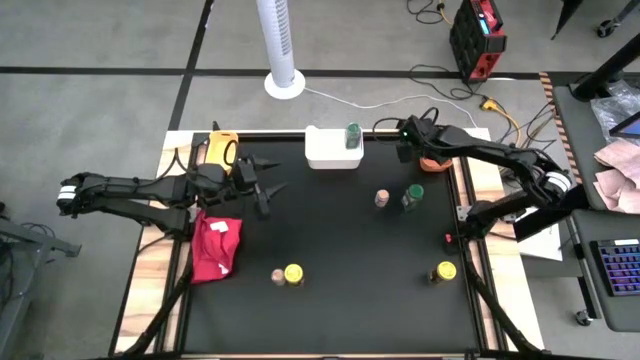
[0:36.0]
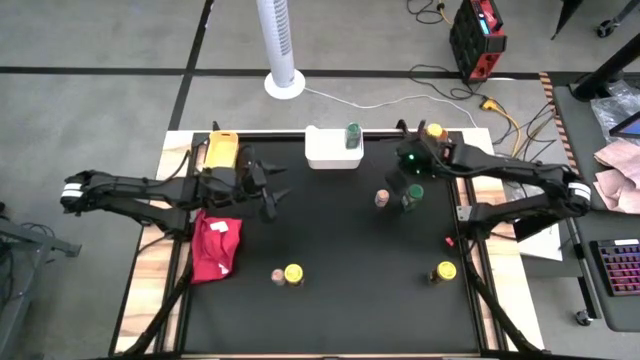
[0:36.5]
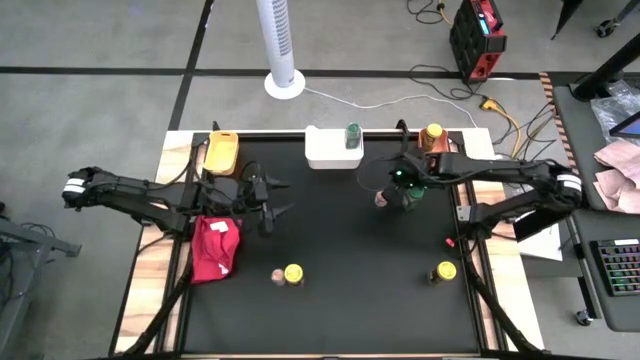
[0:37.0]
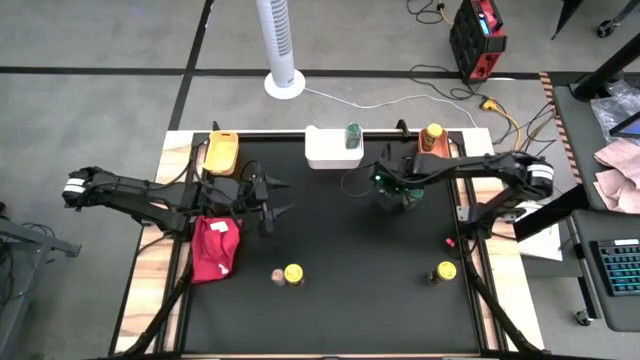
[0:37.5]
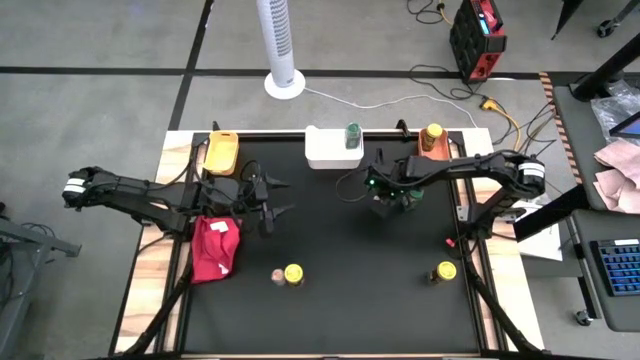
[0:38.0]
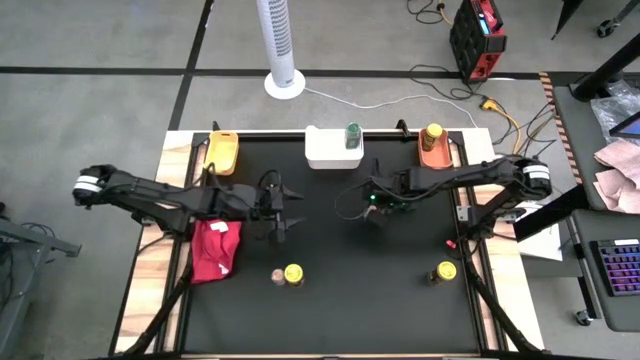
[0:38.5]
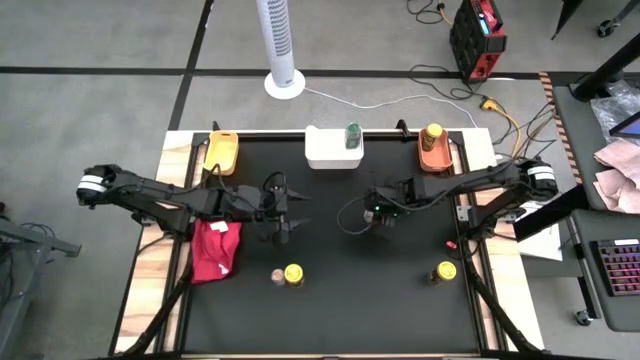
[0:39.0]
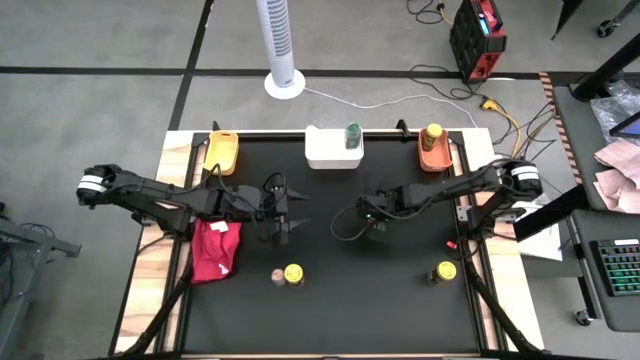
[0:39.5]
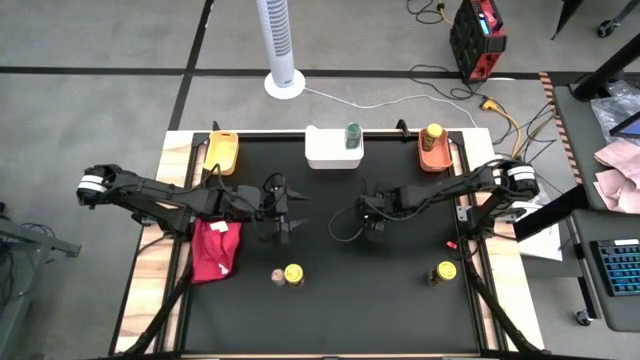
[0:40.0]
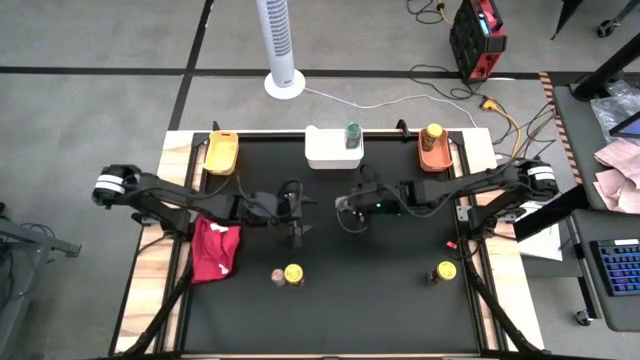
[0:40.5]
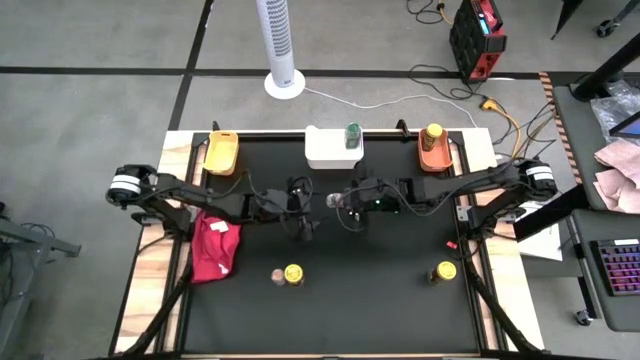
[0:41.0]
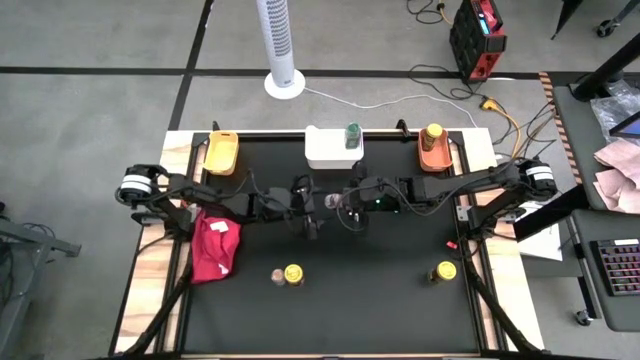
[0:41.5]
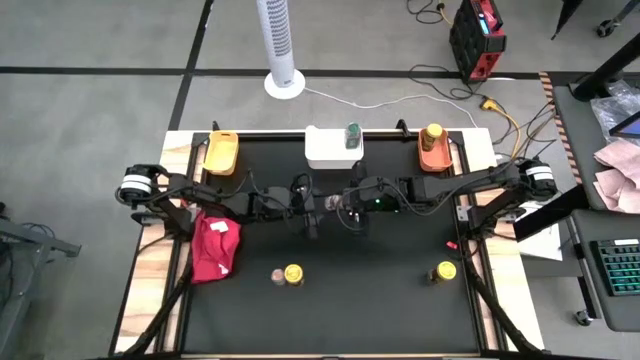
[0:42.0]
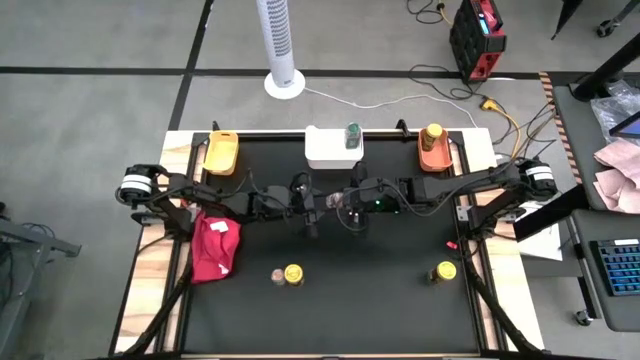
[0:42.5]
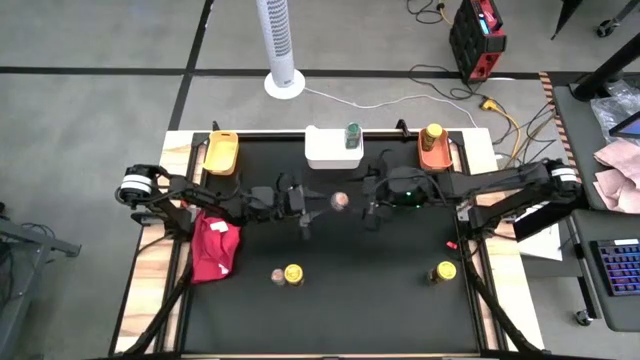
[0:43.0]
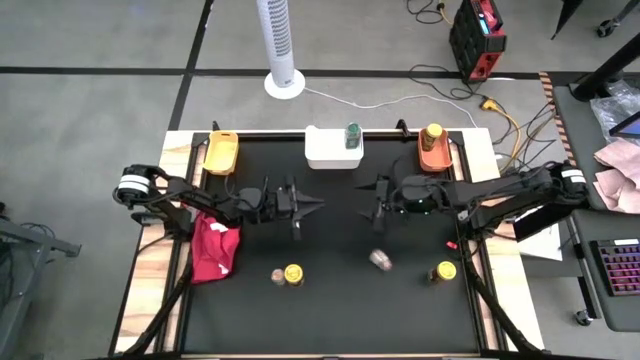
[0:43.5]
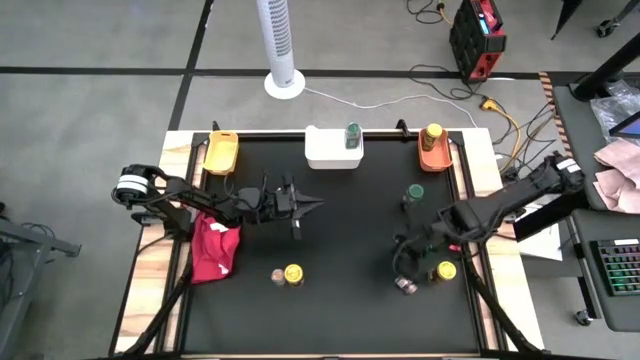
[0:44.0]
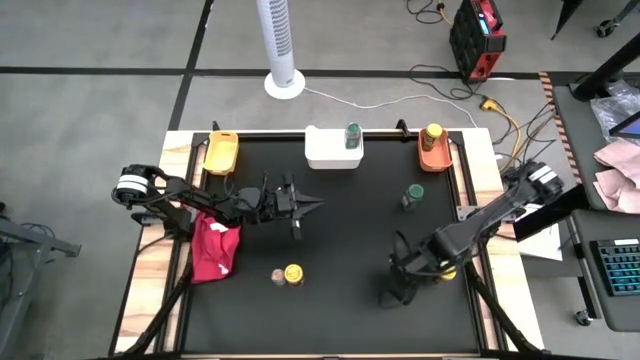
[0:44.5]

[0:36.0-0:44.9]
Task: Sort spices by type
Put the top transparent spice bottle into the yellow bin

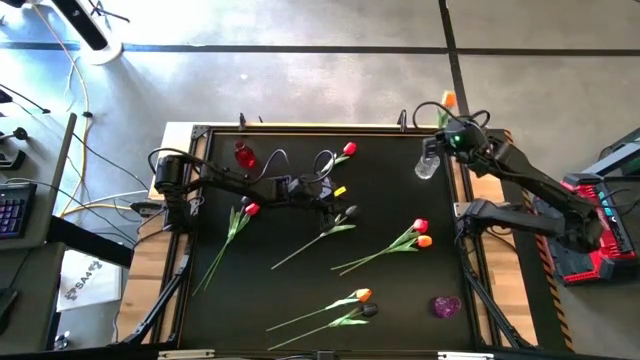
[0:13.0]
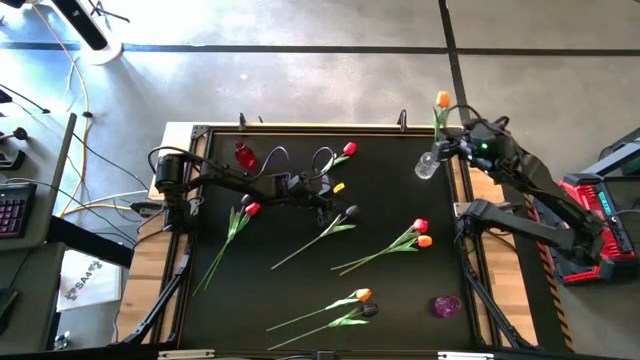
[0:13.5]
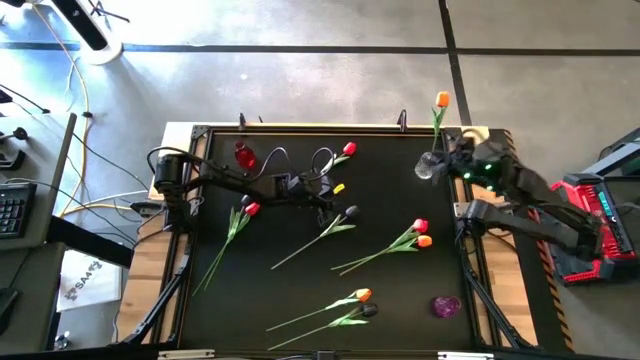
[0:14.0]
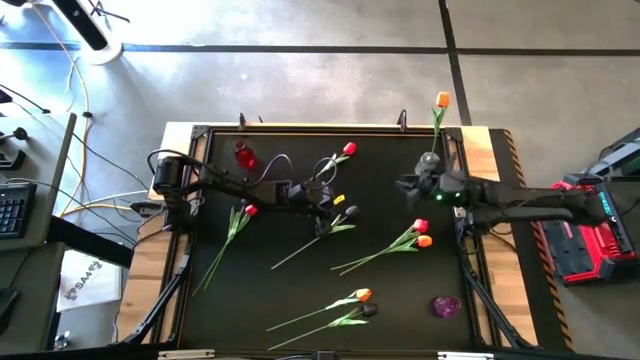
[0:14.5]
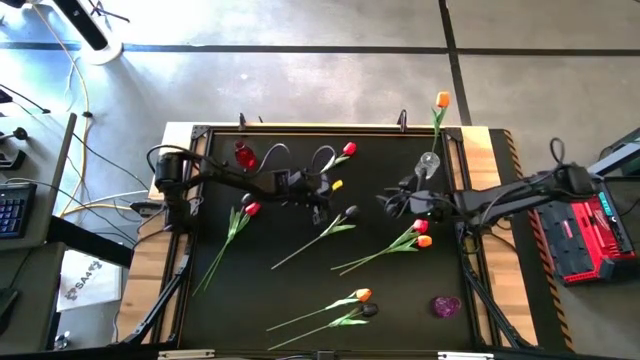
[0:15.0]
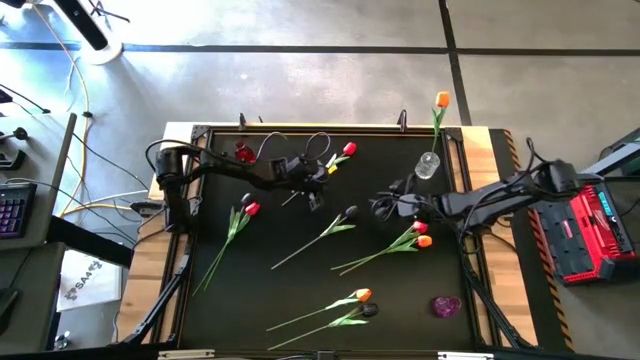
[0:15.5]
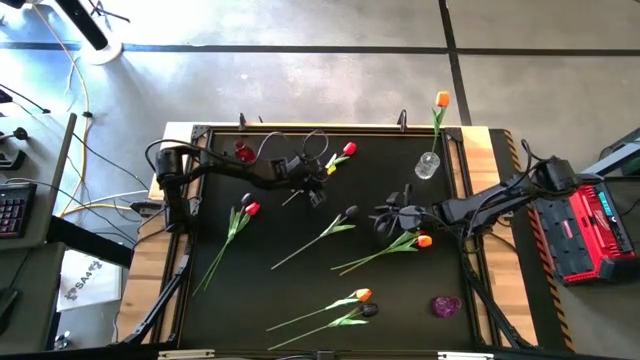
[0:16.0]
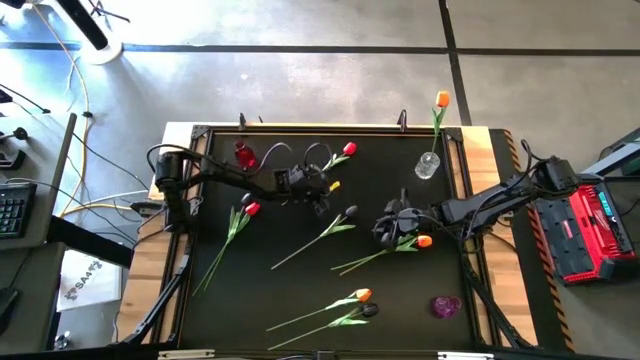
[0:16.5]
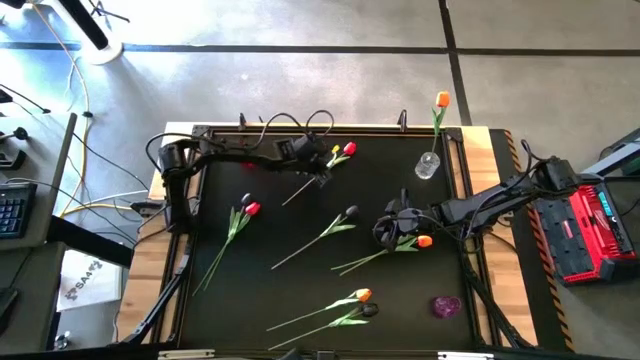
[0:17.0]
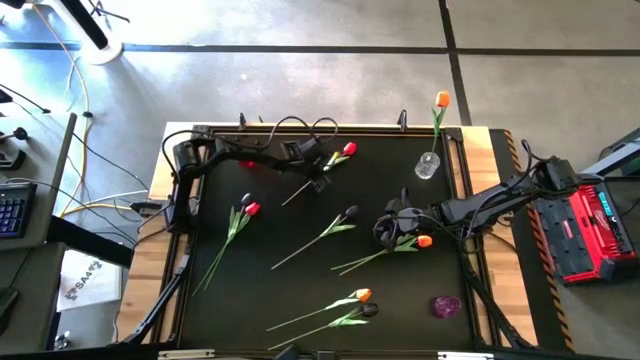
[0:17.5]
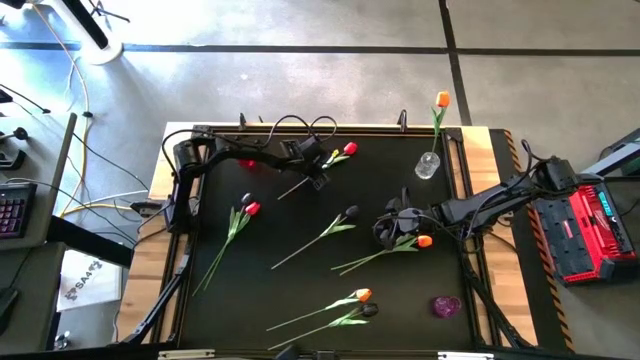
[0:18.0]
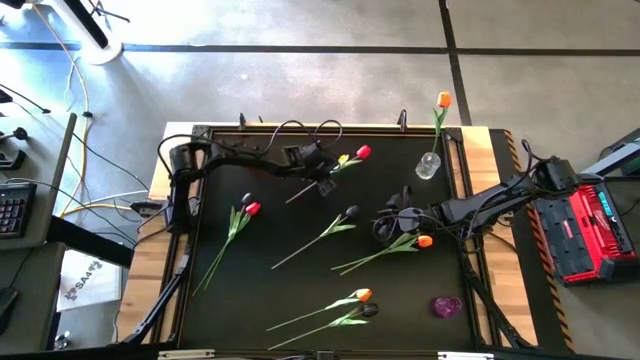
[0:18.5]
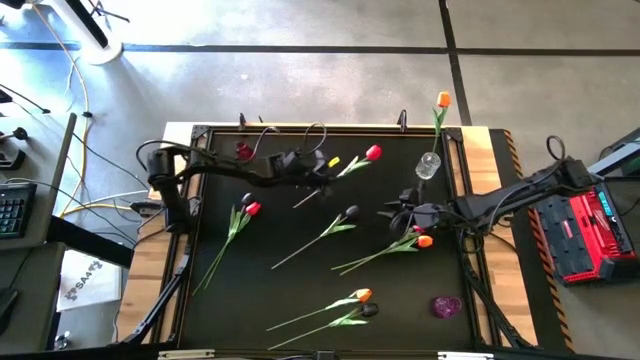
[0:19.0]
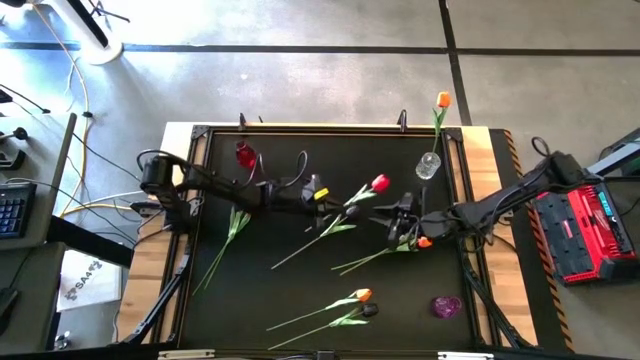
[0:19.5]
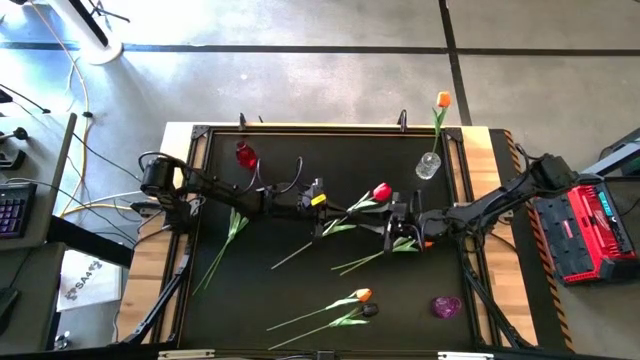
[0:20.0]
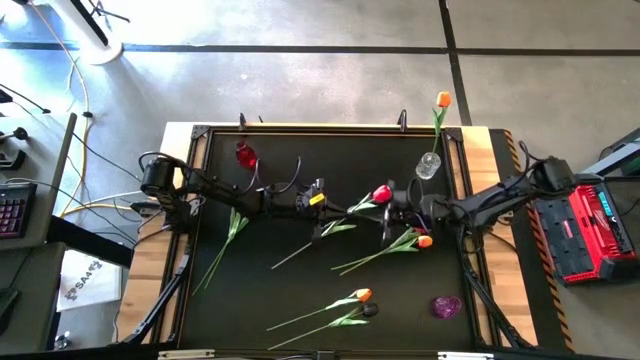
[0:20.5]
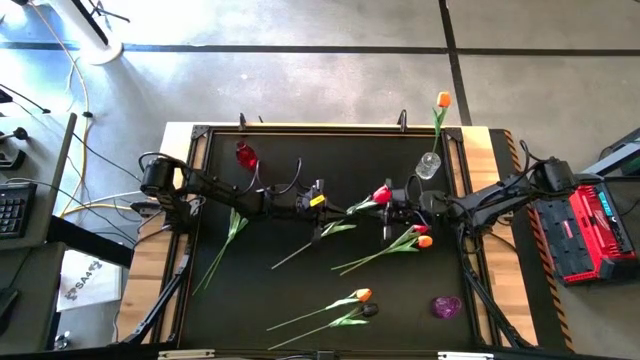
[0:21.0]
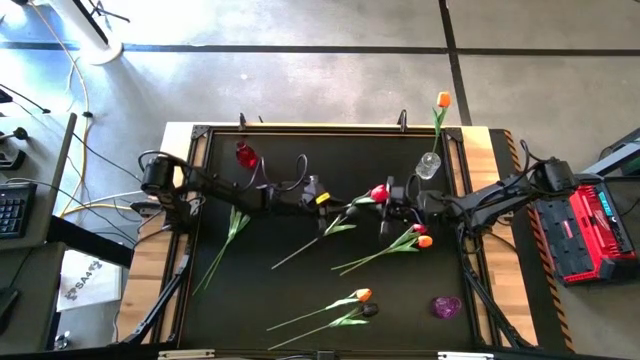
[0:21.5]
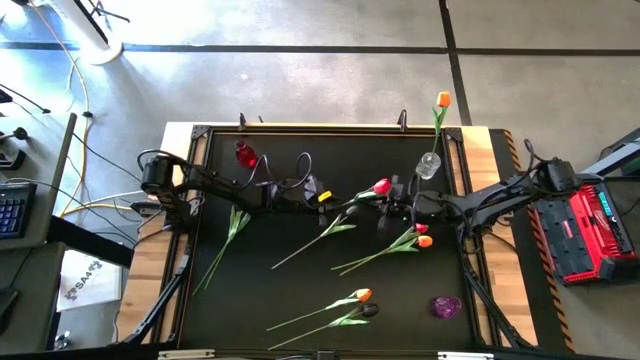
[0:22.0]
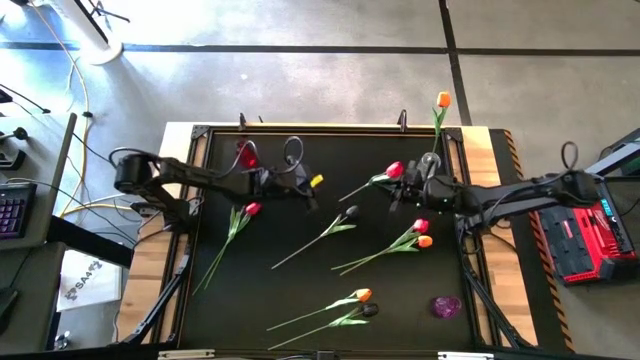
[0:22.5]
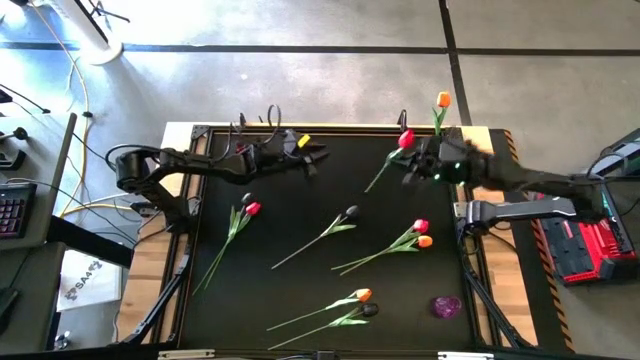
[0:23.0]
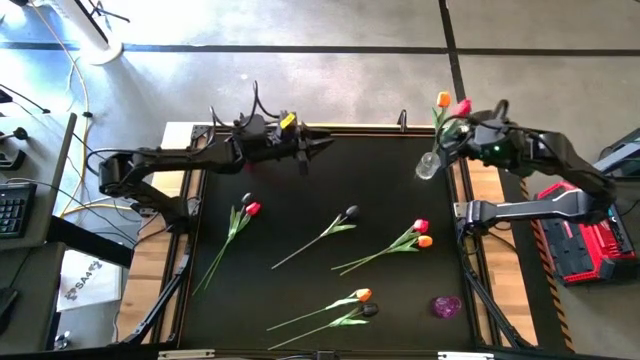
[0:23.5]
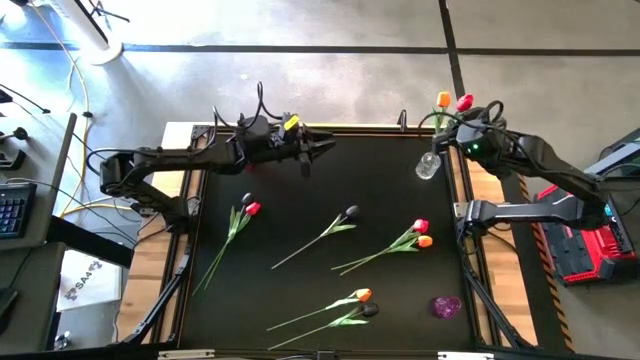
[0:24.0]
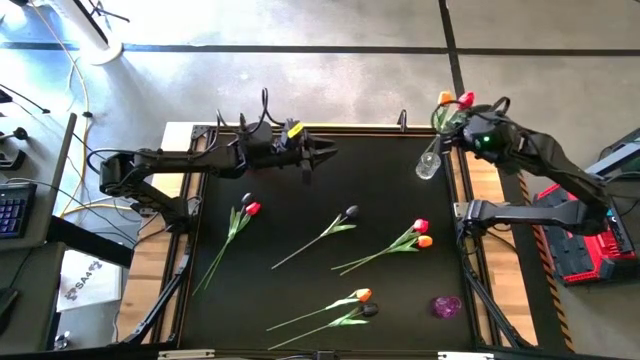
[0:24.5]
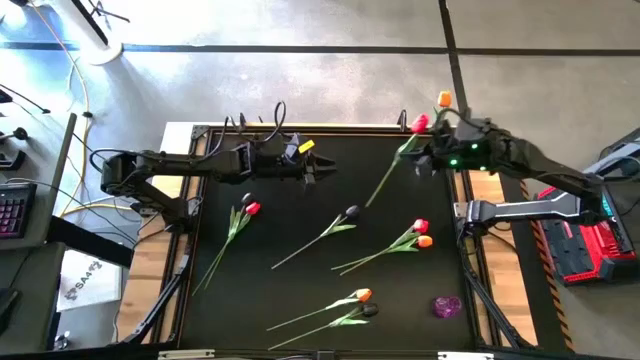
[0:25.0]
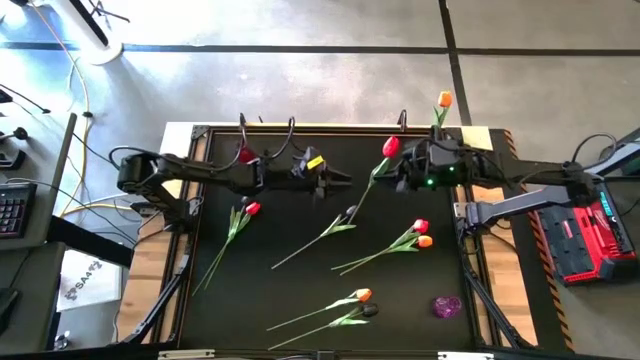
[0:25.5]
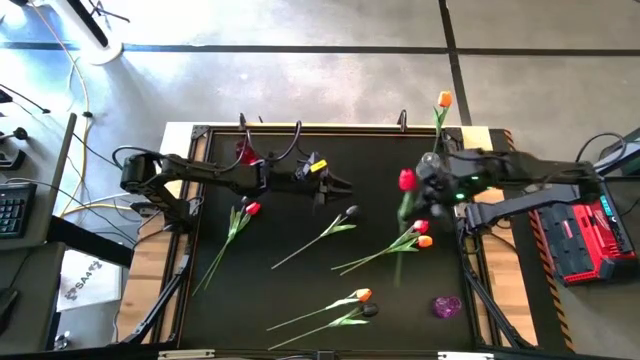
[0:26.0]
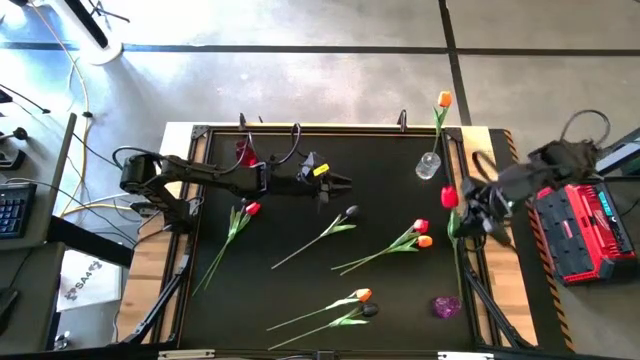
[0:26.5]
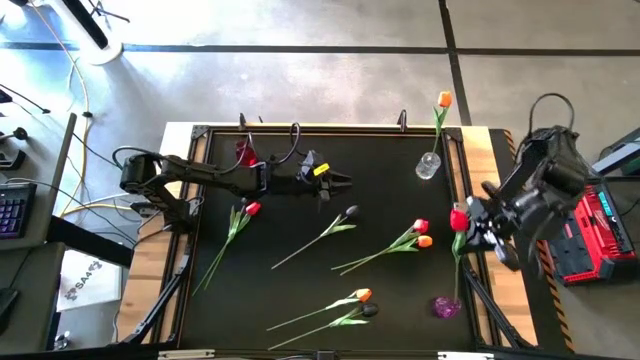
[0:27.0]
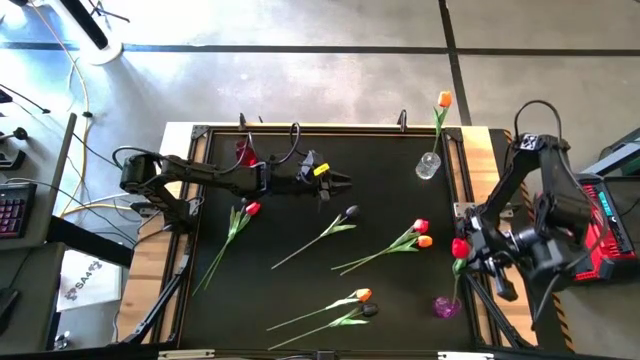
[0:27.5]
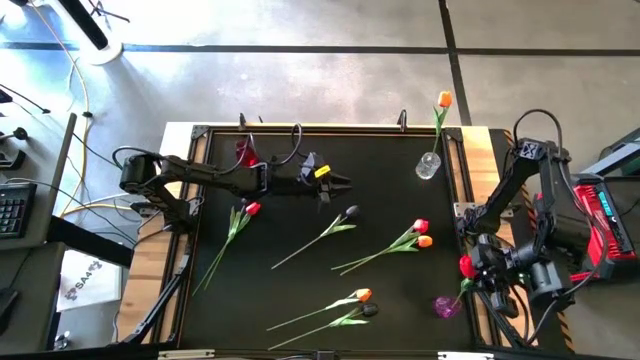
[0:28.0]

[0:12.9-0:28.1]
Task: Sort flowers into vase by color
Put the top red tulip into the purple vase
